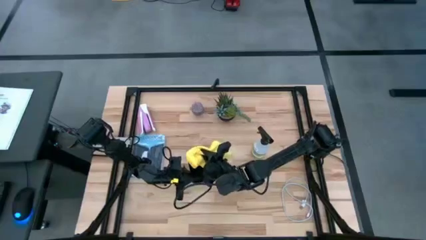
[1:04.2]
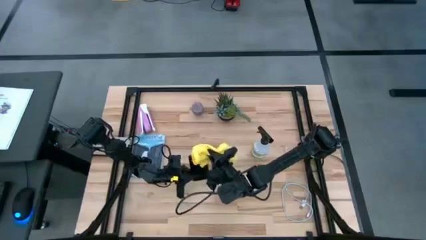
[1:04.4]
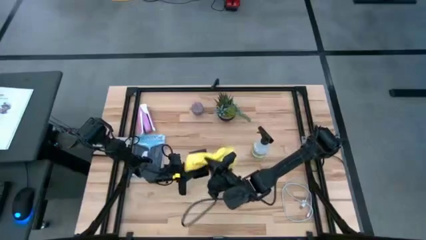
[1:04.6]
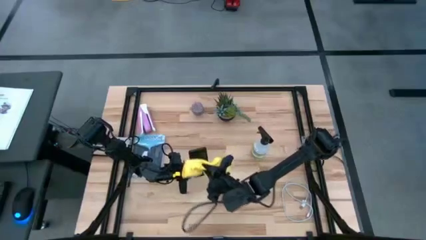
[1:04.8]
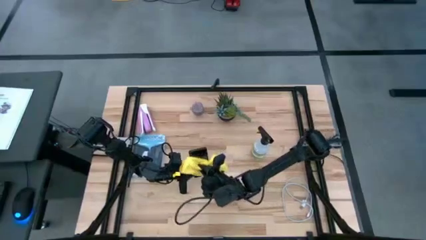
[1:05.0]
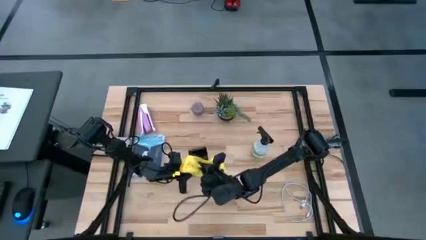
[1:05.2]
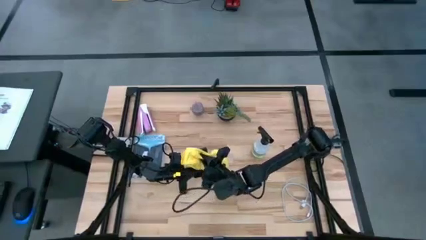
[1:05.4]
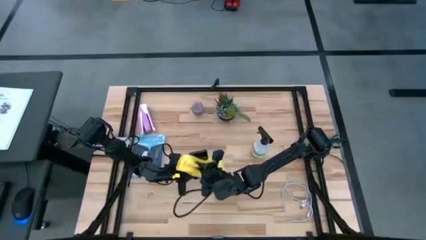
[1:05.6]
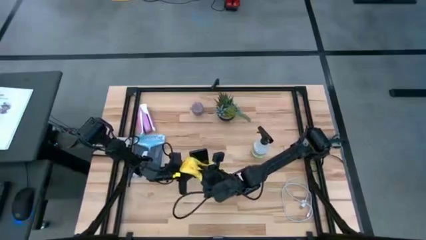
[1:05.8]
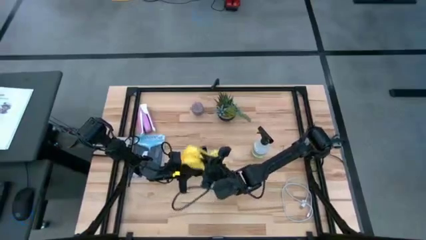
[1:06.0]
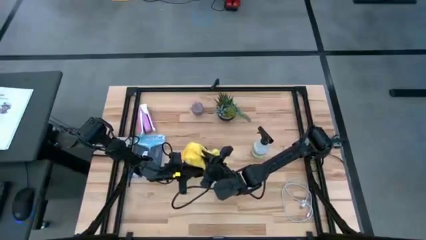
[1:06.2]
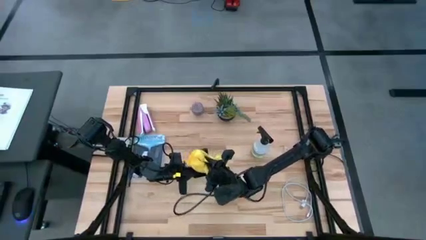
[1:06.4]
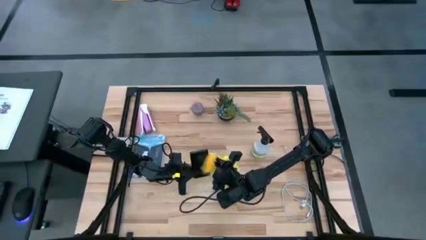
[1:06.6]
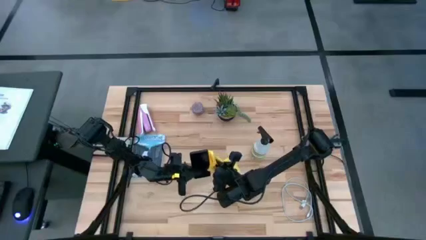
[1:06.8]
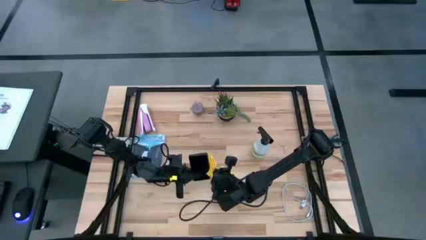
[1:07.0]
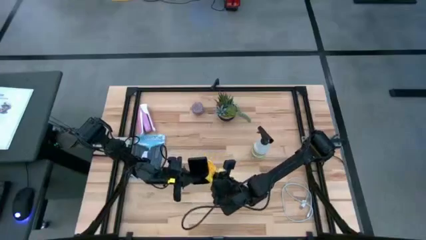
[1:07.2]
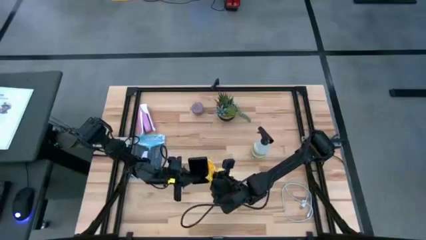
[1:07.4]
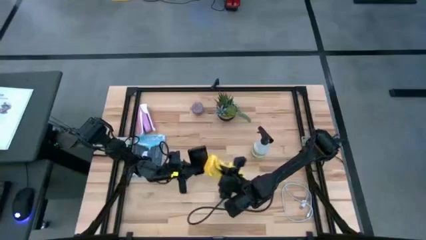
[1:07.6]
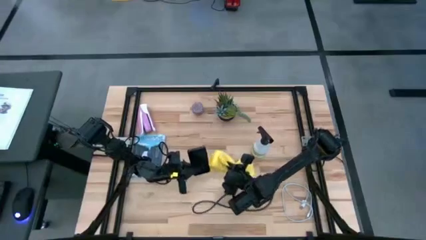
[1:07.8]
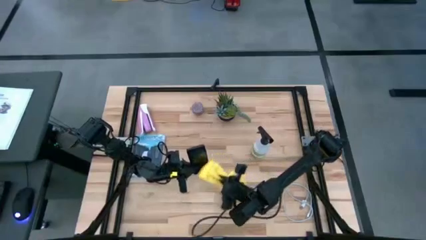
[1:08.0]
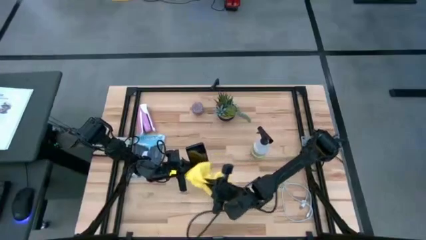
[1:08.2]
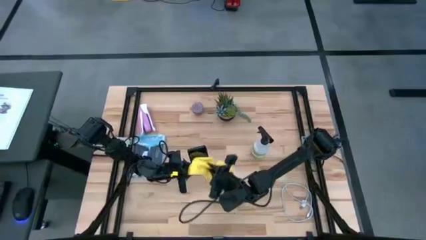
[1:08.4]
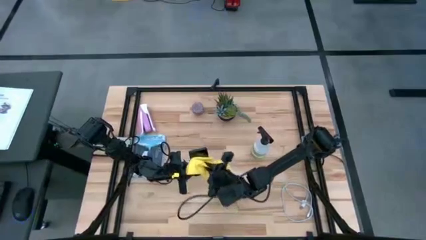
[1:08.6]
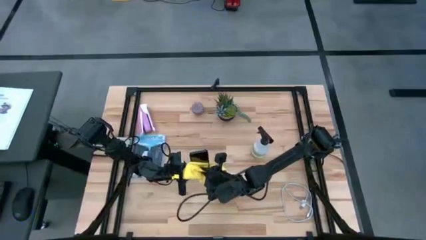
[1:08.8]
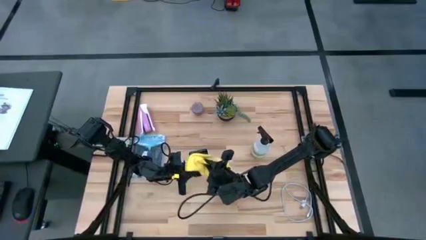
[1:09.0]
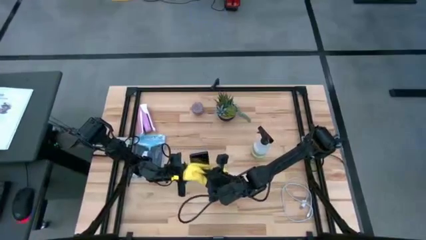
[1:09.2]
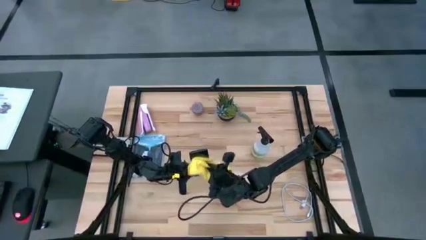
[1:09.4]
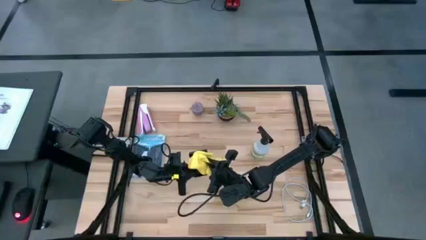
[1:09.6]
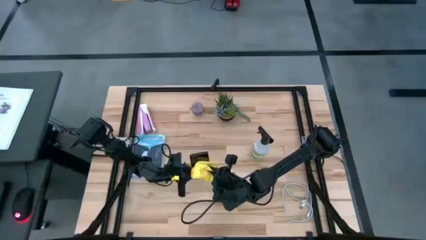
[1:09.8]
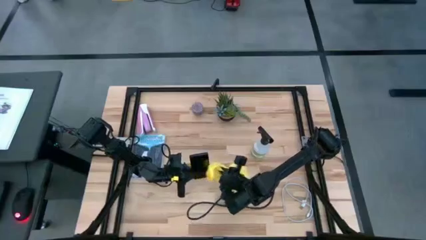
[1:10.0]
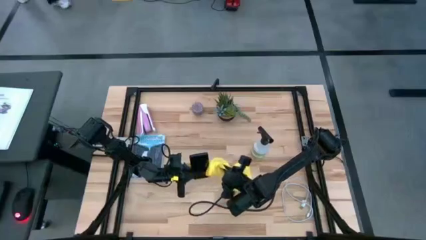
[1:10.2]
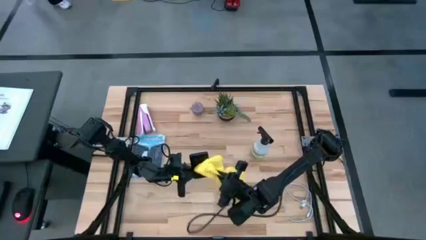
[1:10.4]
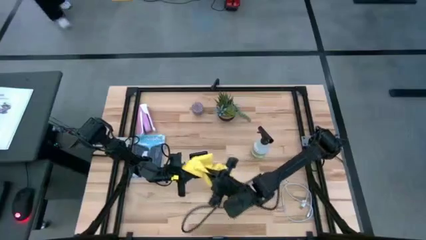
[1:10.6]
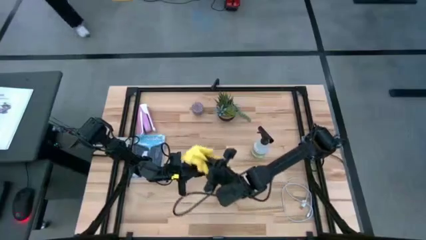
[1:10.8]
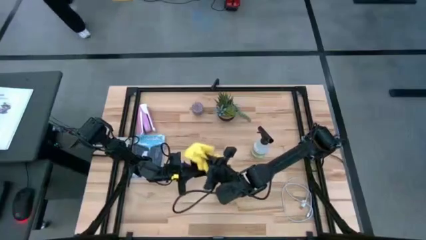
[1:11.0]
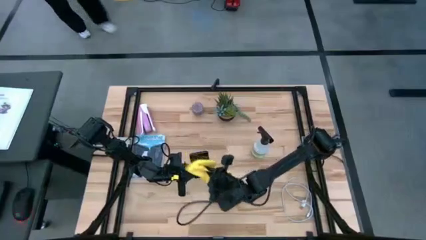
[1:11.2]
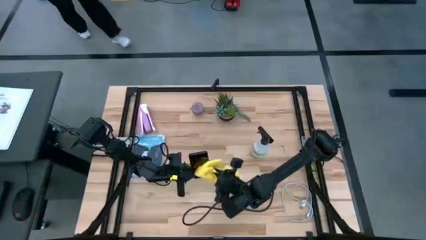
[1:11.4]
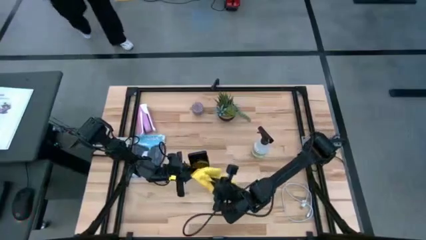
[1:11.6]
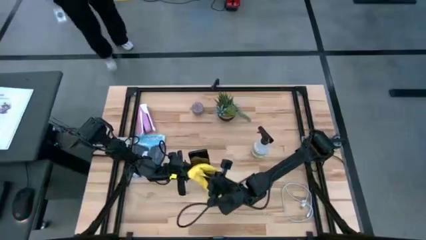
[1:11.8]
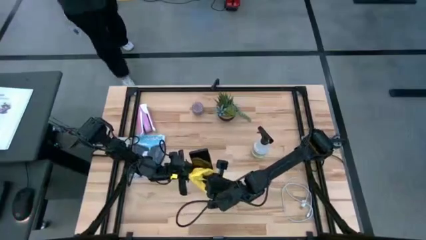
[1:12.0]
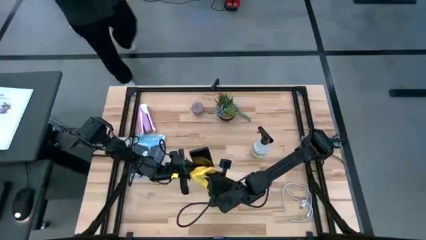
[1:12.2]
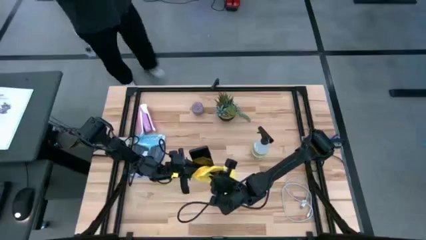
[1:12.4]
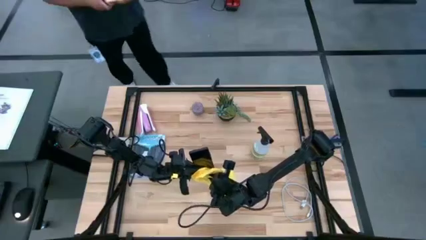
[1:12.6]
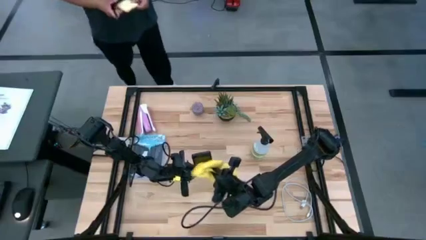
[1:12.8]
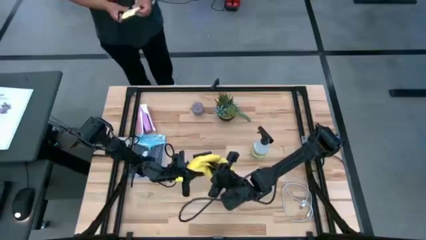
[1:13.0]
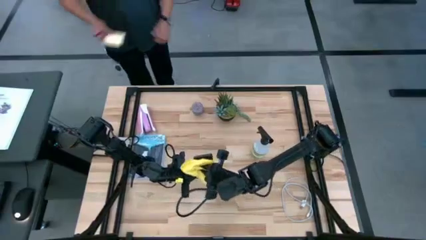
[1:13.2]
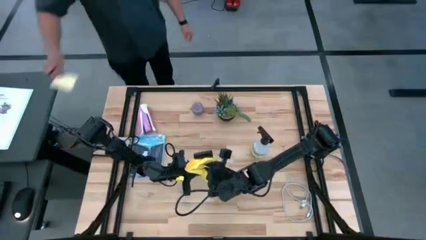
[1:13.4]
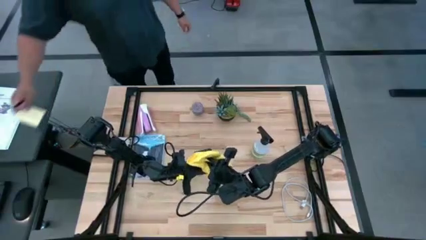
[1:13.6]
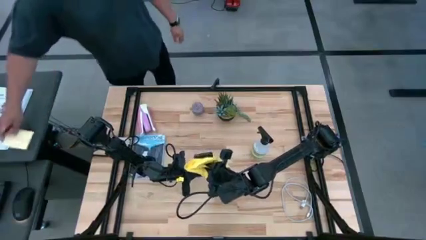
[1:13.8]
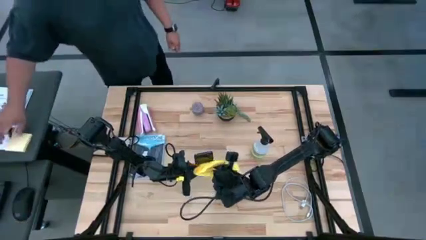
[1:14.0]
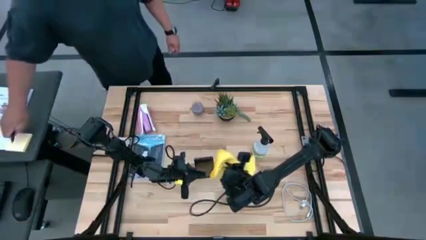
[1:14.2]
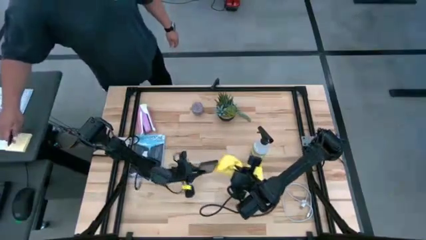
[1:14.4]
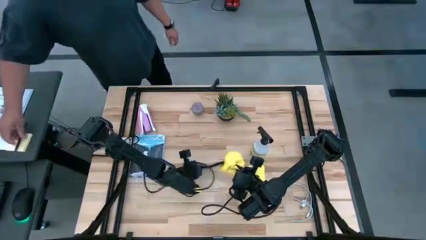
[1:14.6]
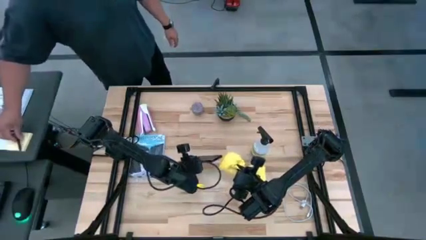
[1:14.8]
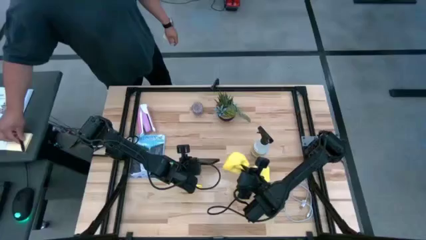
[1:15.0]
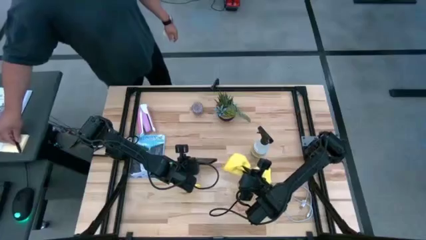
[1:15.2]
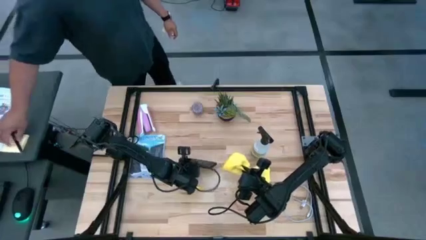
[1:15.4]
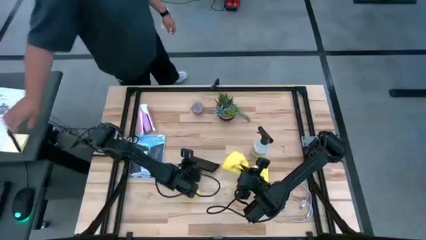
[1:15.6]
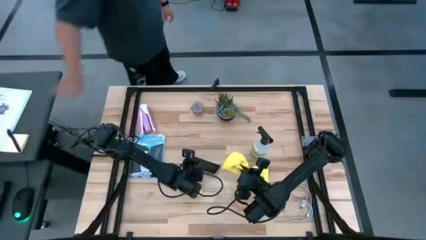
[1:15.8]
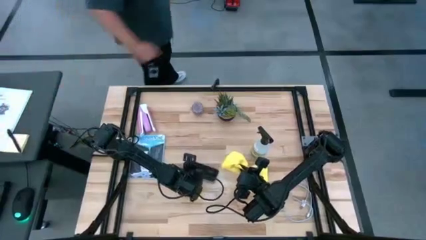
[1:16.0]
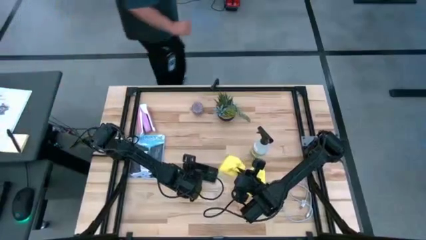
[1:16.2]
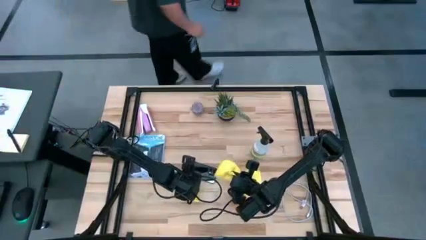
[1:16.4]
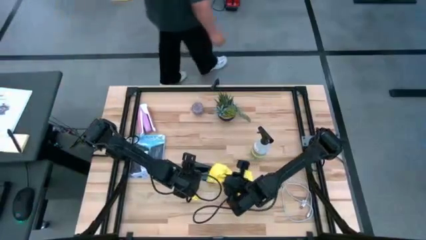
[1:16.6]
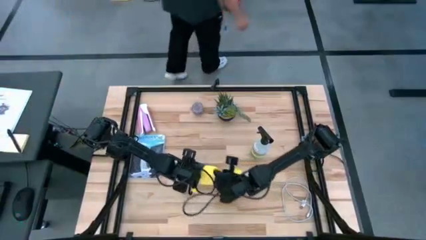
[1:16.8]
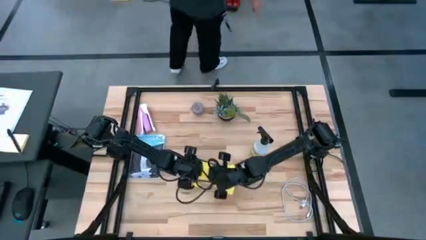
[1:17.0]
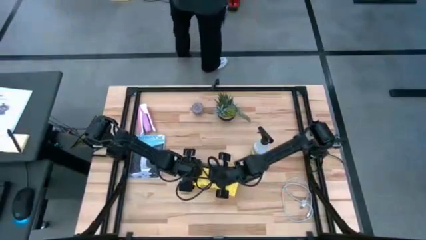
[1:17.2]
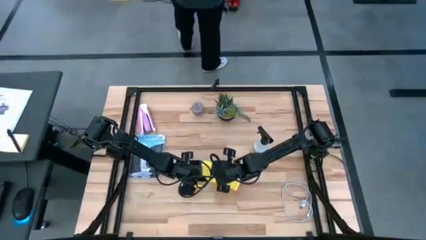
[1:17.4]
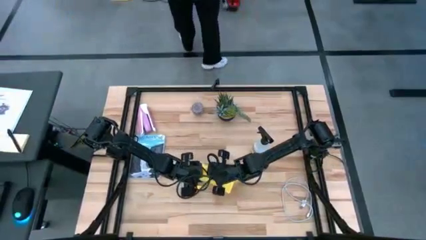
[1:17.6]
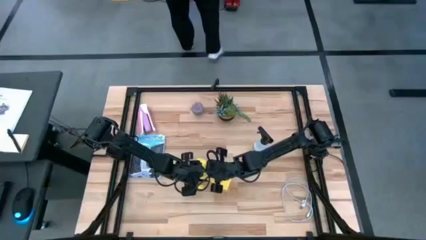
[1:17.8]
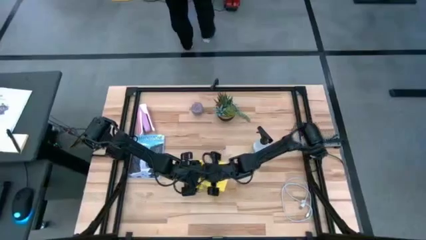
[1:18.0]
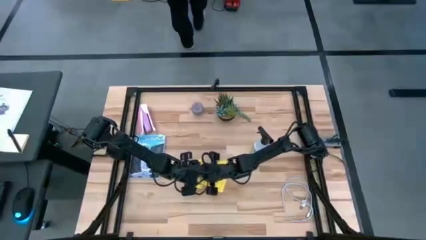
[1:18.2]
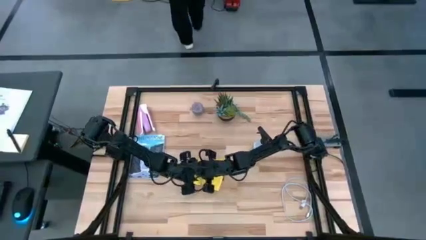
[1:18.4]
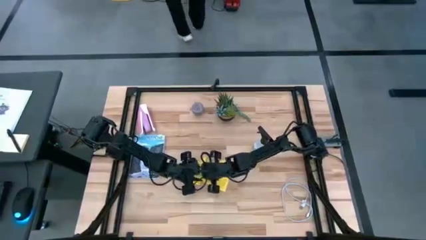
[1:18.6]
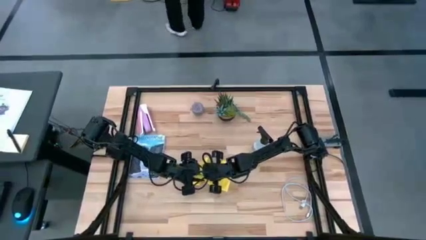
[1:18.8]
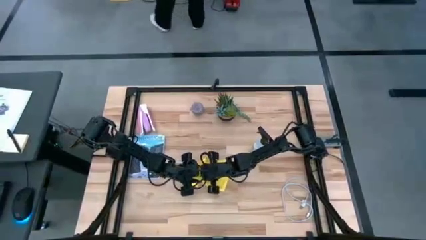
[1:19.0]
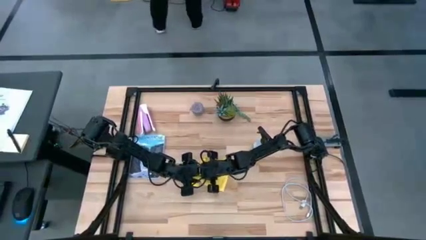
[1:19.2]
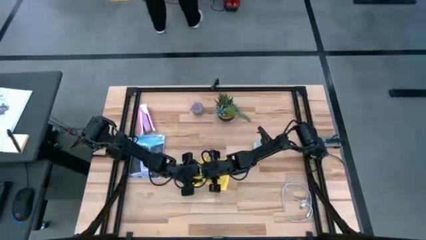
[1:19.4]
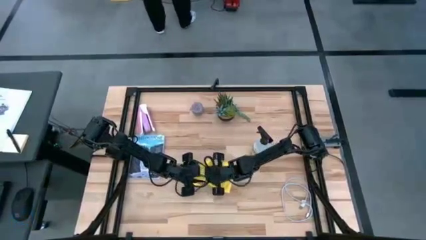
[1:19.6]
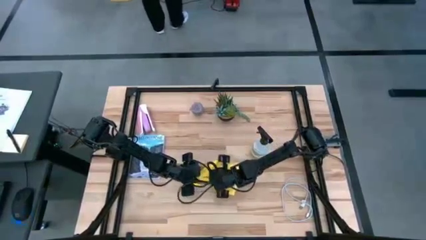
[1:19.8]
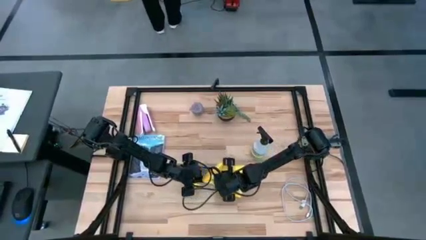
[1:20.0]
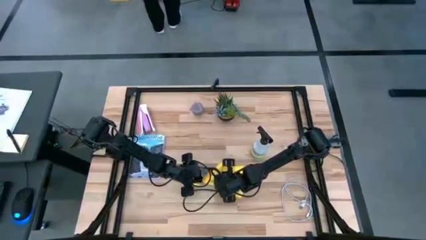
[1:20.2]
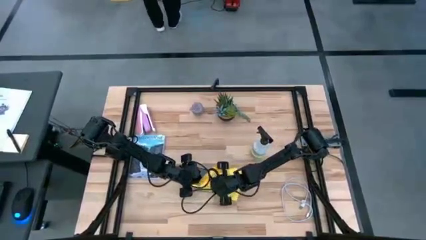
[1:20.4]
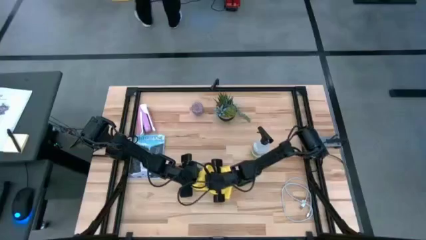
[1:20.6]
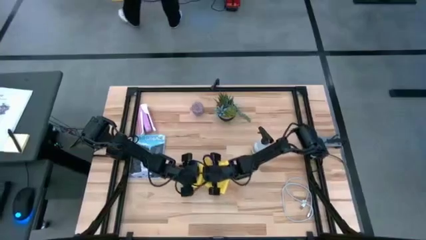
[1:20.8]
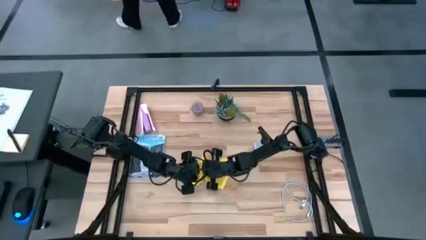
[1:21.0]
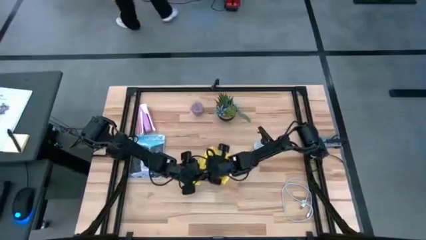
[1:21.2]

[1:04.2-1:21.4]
Task: Apply microfiber cloth
Wipe the cellphone with the microfiber cloth
